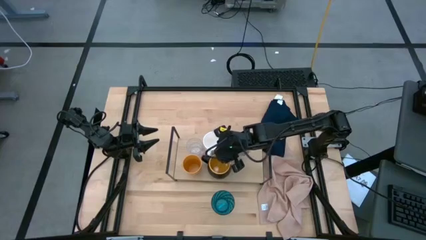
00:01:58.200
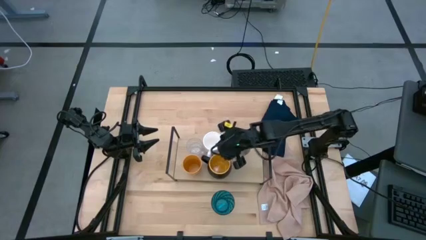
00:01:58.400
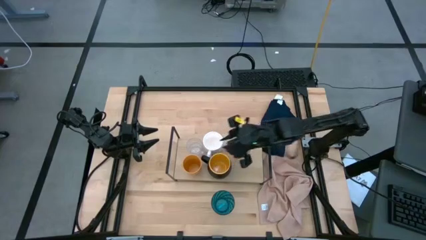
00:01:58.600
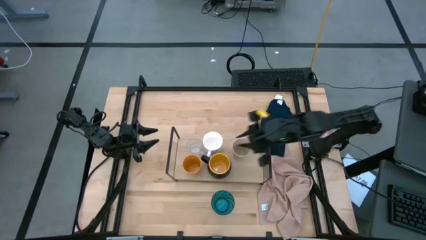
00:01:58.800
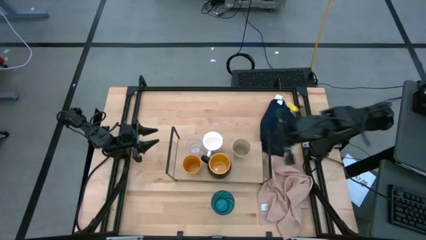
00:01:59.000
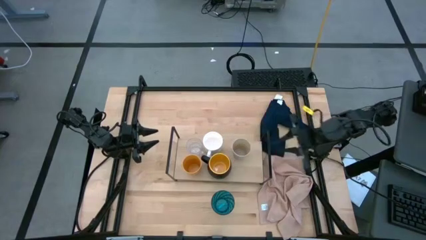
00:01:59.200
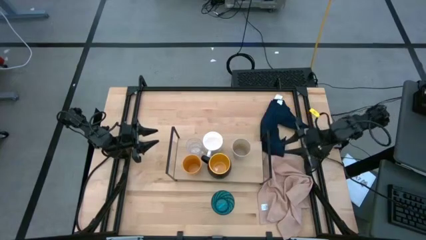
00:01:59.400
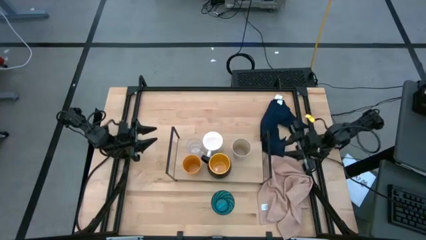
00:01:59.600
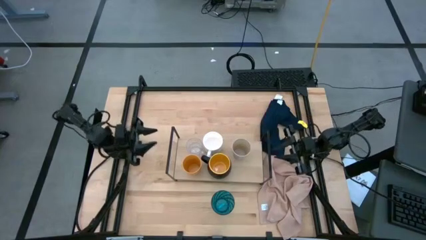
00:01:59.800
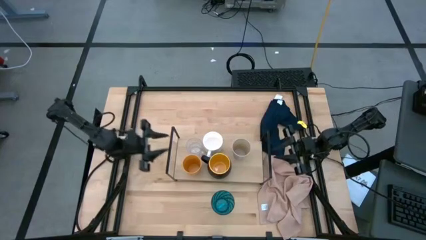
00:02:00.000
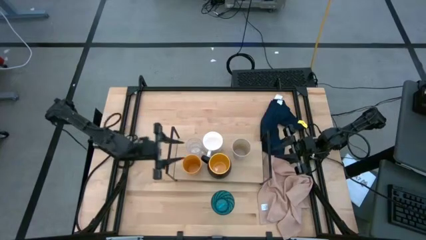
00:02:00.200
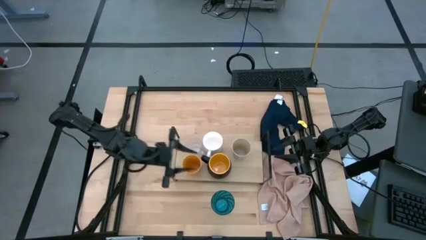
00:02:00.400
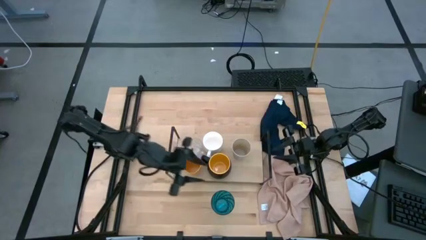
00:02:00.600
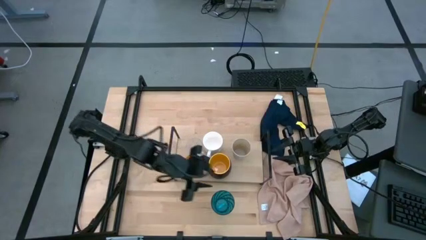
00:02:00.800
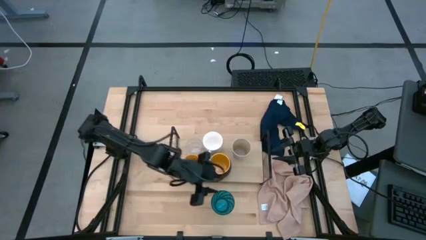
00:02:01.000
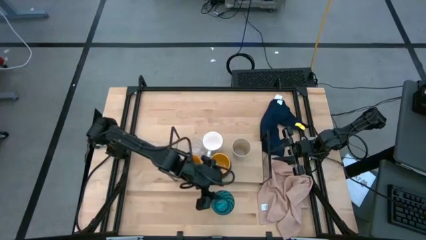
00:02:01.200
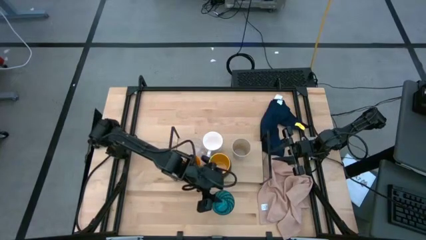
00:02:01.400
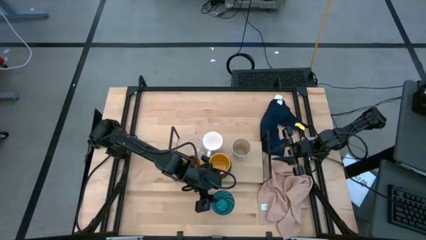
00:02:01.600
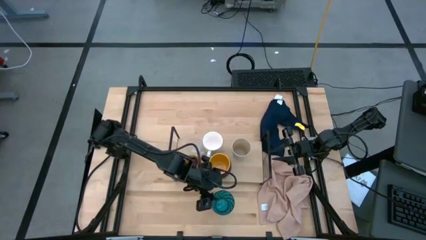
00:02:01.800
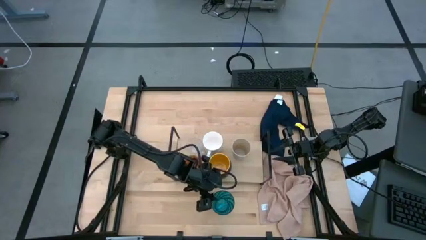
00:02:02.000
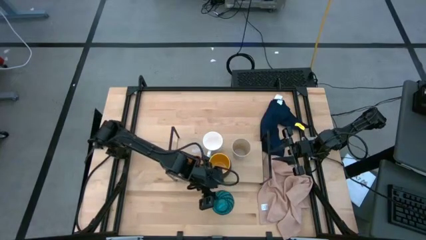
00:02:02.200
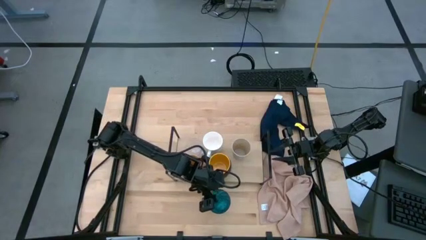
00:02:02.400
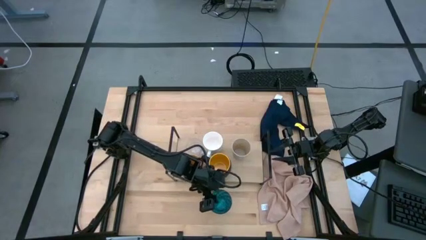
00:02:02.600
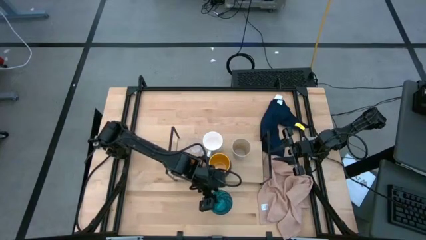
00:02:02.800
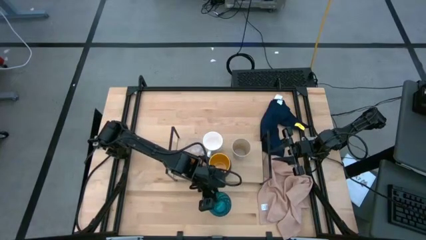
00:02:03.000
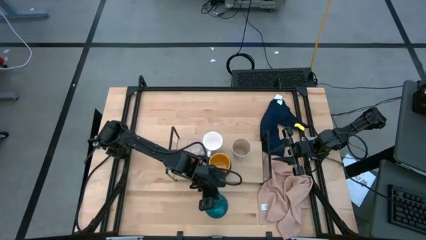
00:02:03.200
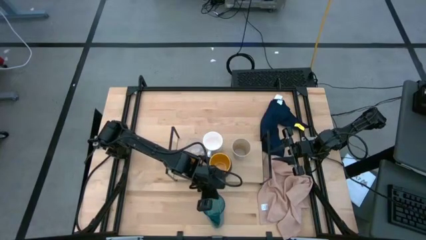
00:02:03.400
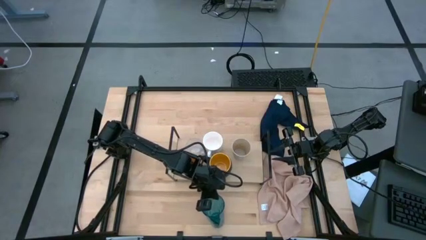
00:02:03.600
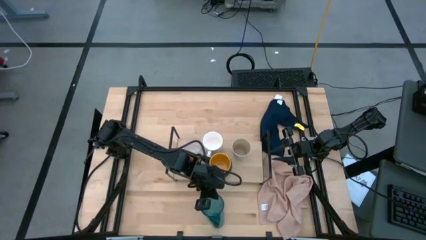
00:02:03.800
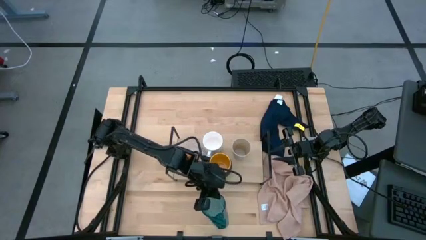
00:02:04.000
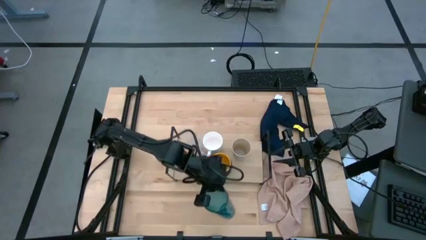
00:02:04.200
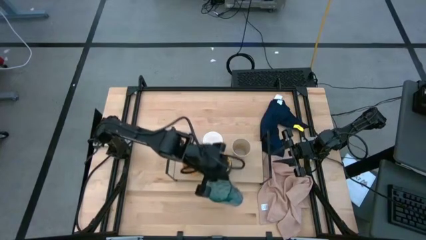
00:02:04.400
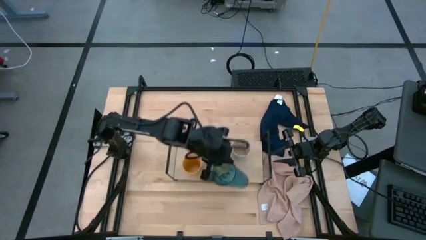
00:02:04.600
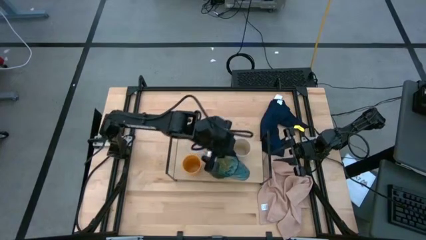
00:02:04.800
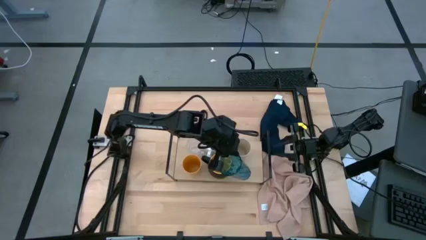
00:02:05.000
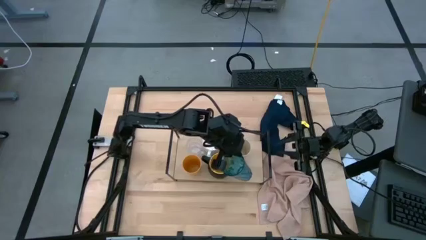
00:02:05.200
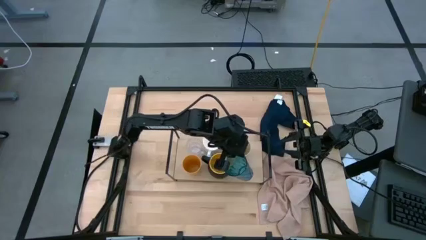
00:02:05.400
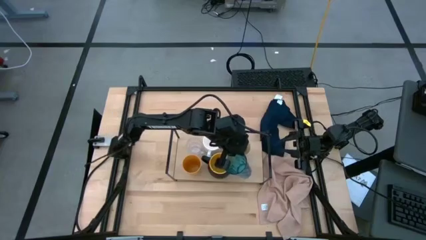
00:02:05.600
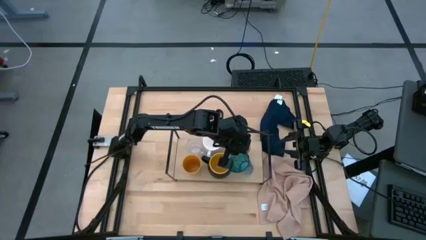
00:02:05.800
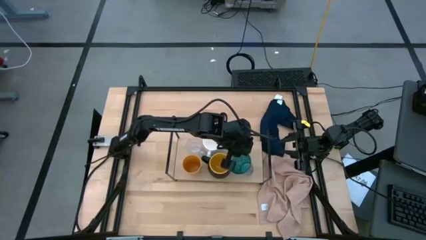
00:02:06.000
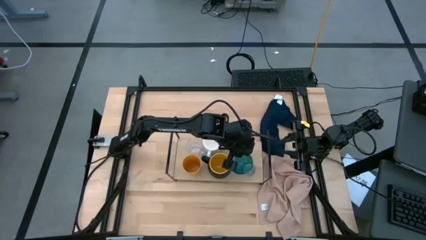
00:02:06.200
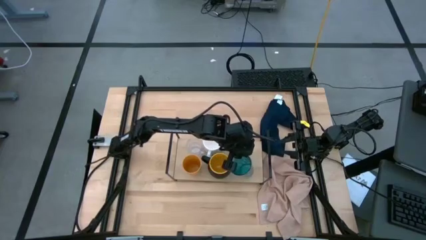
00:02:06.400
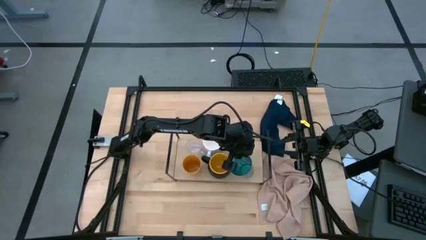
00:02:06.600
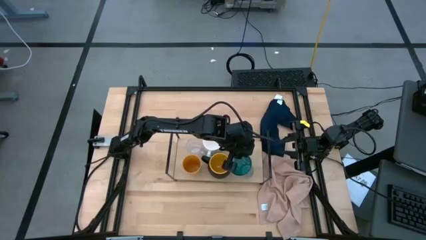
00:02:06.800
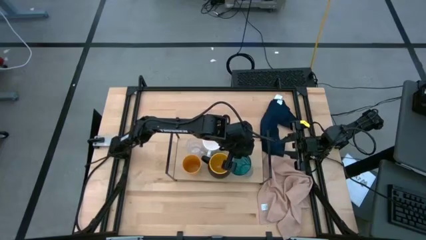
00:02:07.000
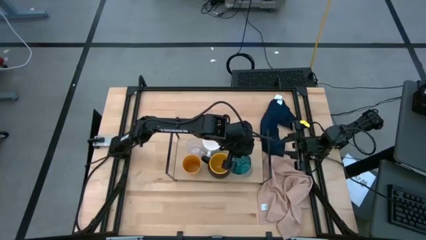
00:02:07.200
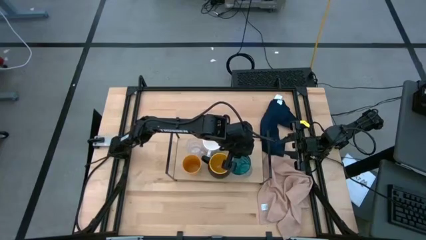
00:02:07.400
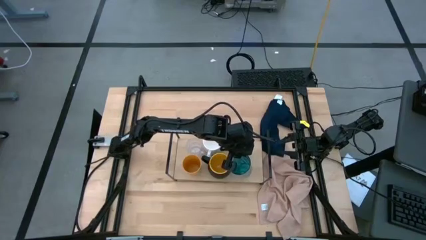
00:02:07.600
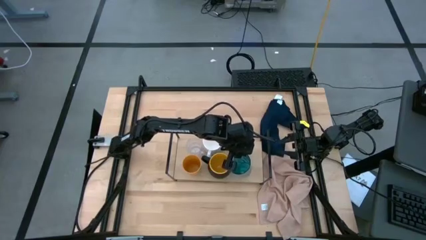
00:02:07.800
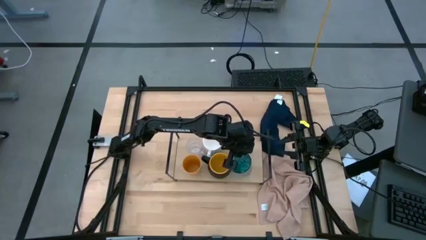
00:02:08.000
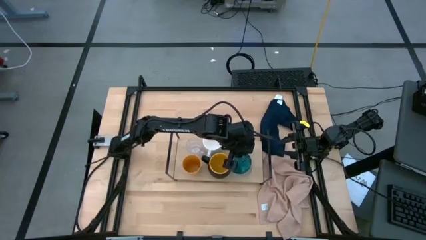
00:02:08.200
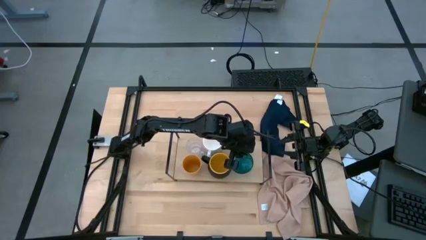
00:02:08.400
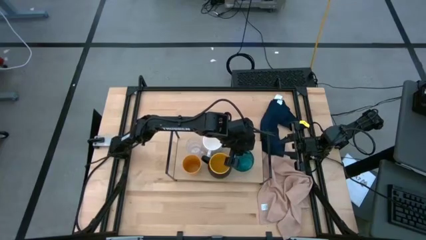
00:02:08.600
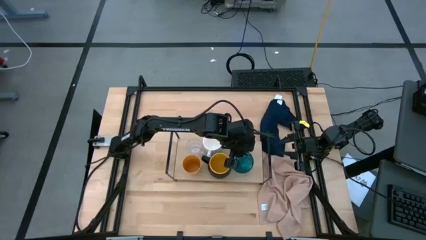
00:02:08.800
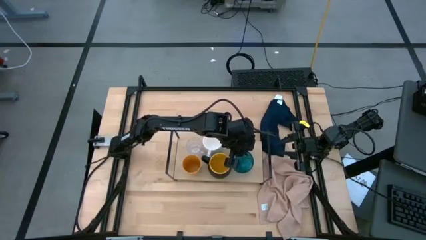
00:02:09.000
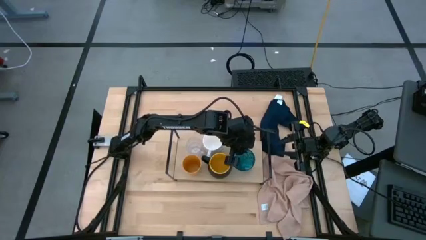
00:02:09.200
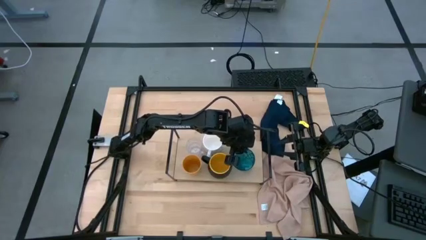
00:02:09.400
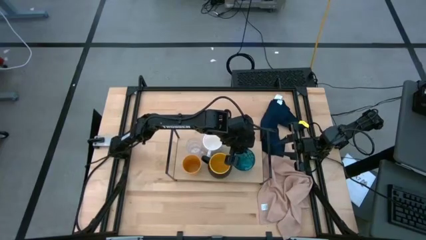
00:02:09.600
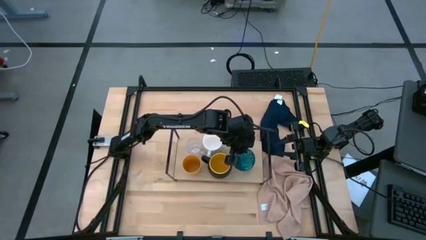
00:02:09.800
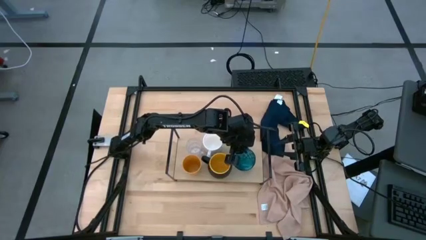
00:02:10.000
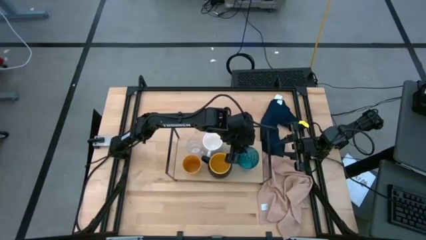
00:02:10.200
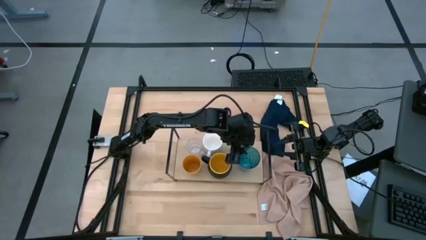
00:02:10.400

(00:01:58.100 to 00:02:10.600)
Task: Stack small to large cups/mugs on shelf
Align the blue transparent cup with the white cup on the shelf

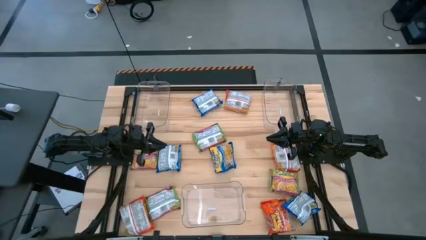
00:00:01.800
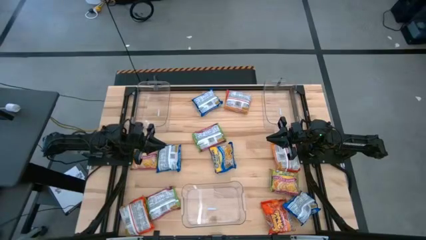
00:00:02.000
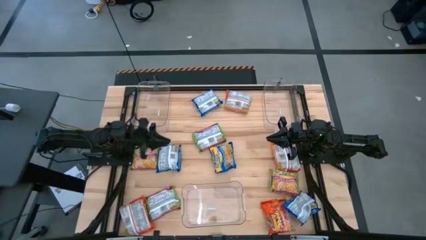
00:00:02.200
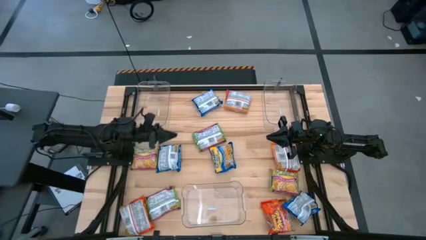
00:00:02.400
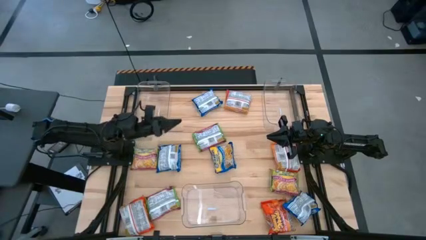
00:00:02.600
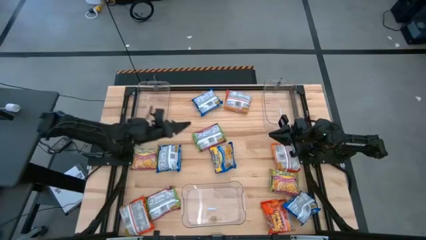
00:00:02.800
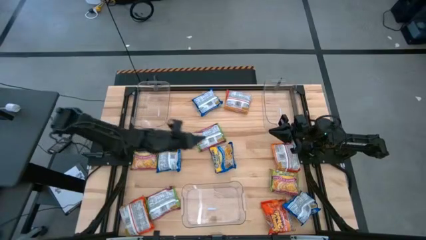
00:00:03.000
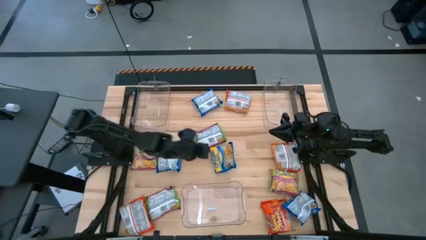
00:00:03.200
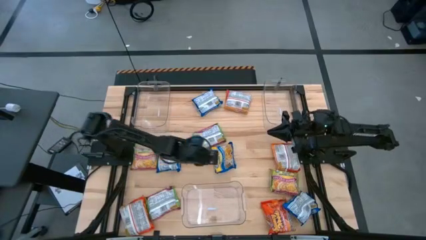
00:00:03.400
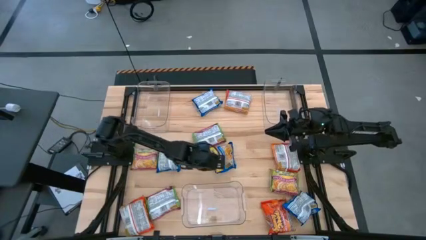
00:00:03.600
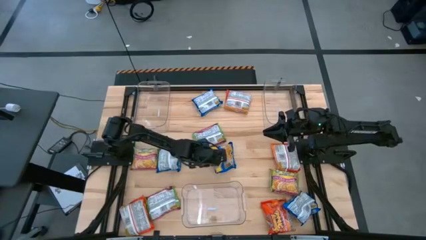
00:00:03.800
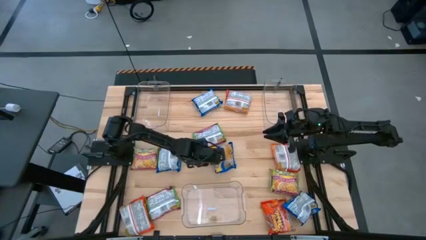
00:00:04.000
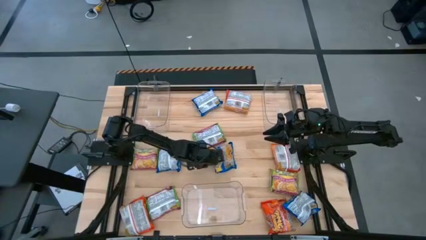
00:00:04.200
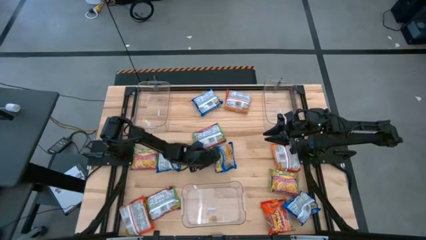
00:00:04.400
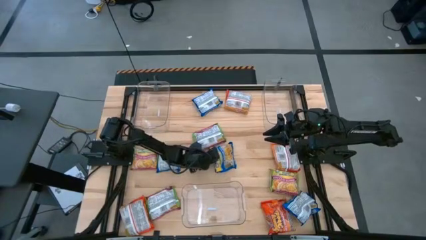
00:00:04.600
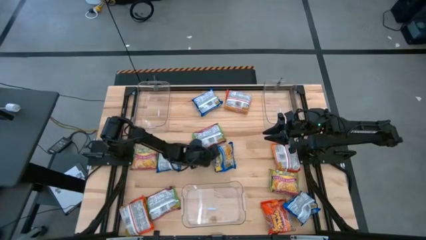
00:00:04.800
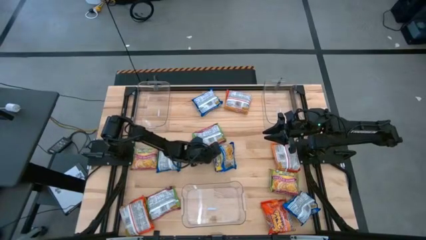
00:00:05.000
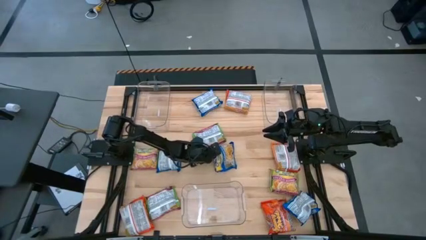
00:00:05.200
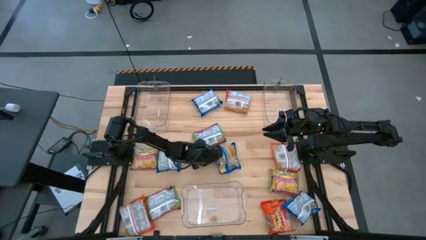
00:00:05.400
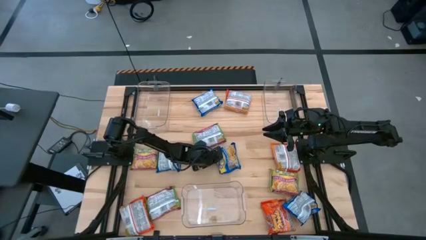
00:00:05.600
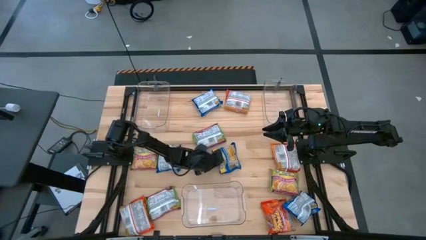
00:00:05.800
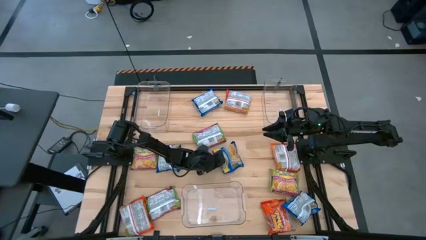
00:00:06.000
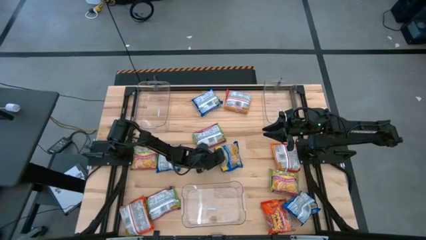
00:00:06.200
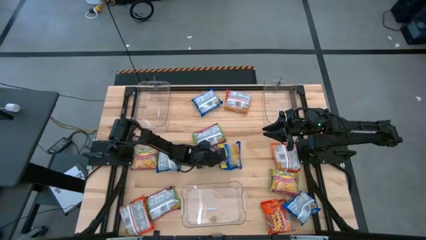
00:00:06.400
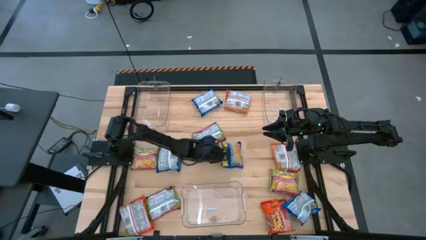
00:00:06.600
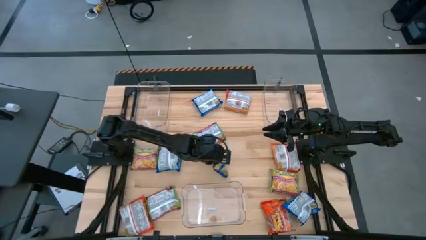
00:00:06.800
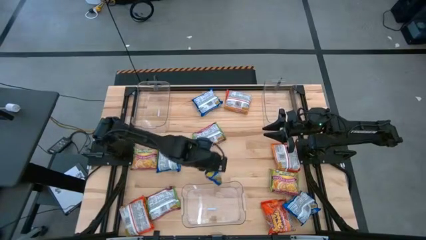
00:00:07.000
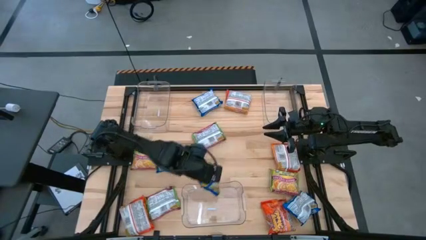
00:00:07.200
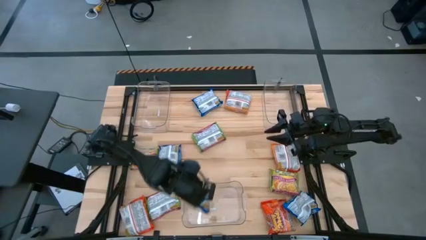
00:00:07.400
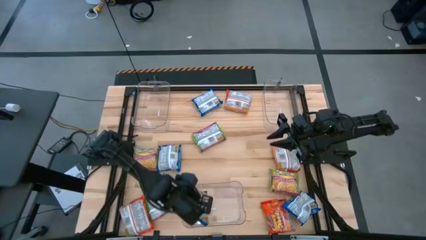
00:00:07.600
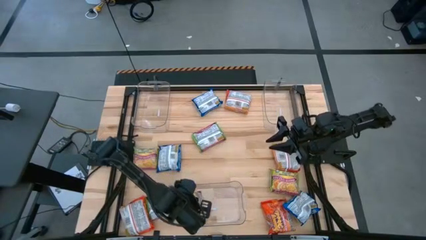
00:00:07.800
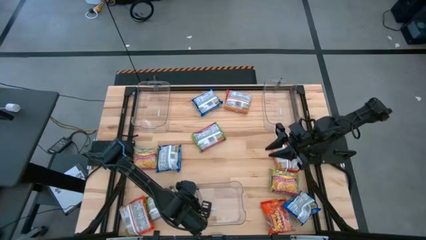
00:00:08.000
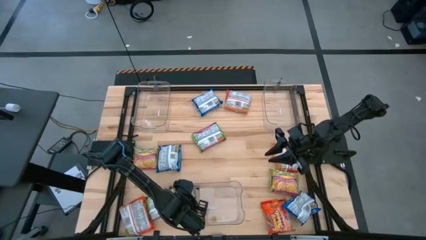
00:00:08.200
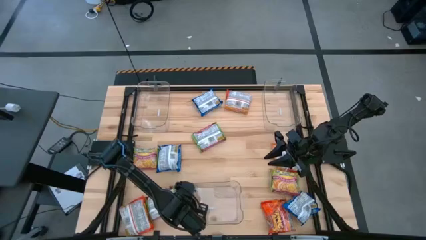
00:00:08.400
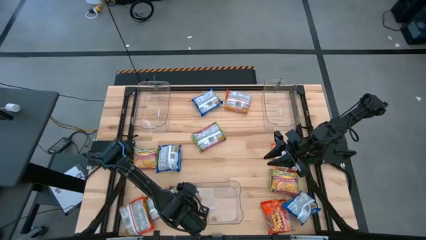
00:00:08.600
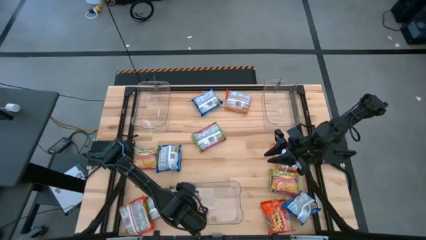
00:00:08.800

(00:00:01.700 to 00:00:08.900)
Task: Sort Maruchan noodles
Put the blue noodle pack into the bottom transparent bin
